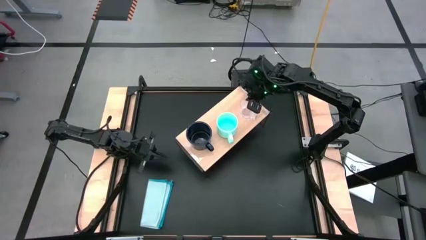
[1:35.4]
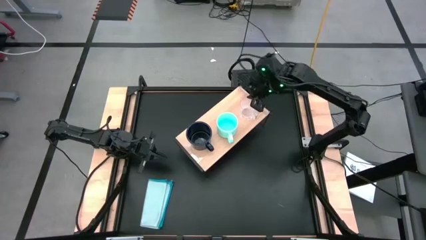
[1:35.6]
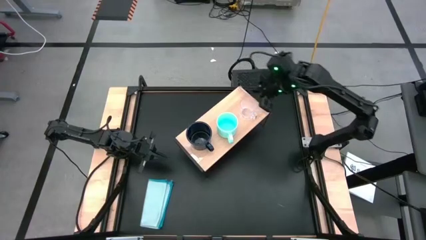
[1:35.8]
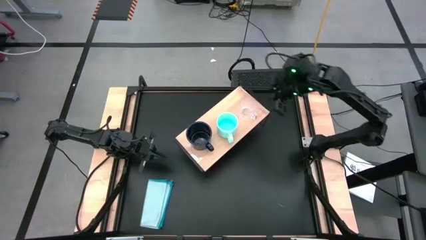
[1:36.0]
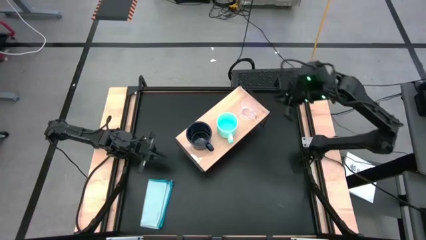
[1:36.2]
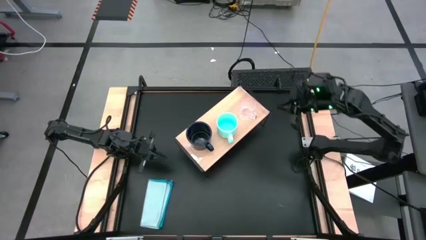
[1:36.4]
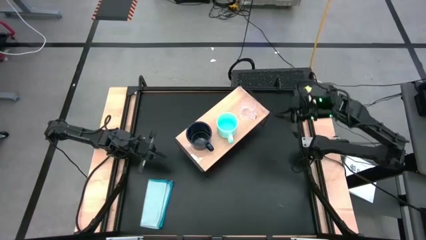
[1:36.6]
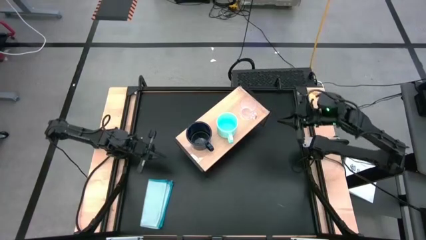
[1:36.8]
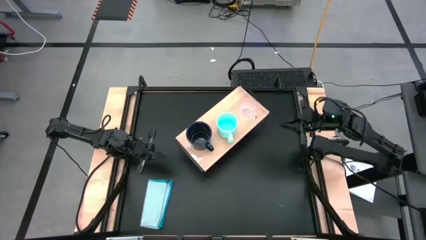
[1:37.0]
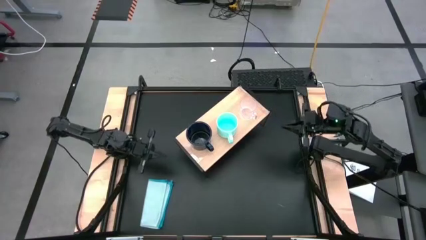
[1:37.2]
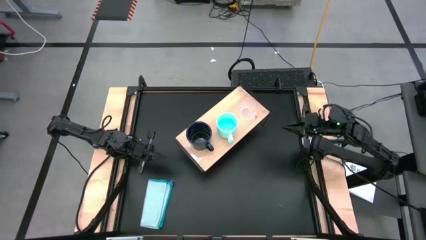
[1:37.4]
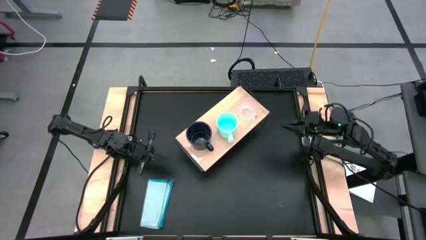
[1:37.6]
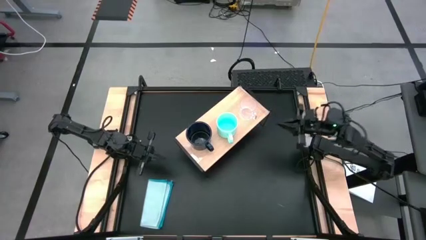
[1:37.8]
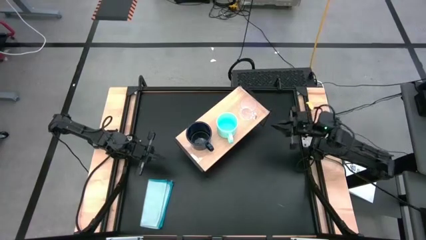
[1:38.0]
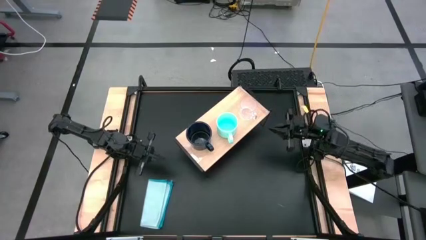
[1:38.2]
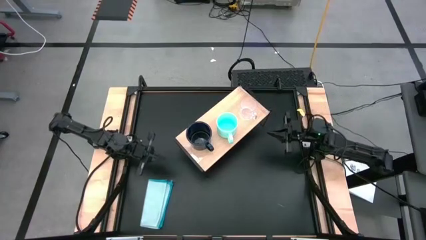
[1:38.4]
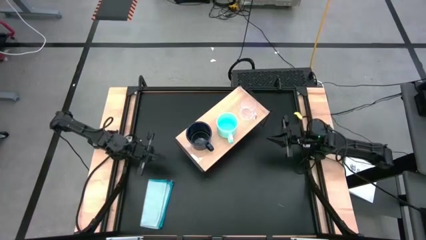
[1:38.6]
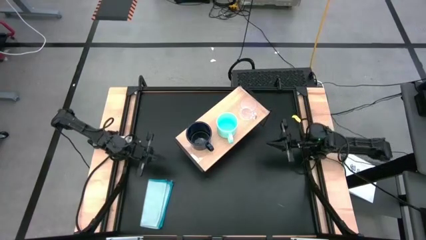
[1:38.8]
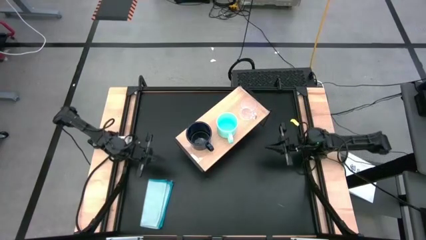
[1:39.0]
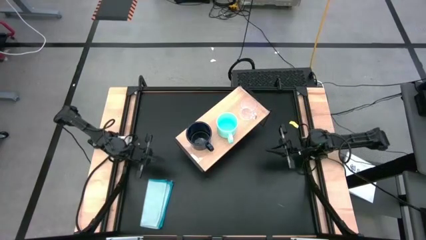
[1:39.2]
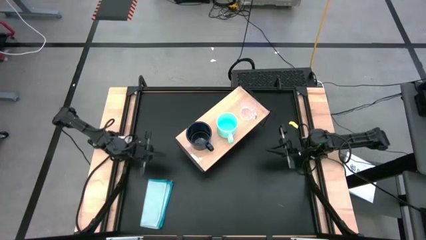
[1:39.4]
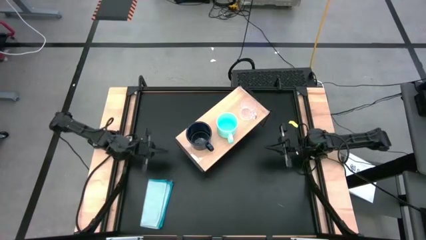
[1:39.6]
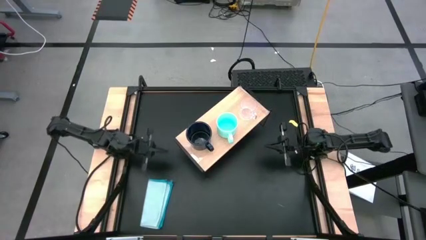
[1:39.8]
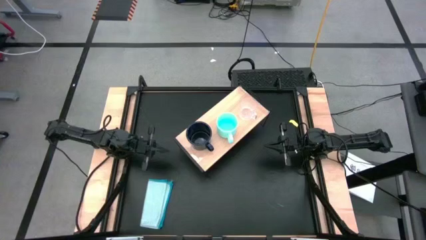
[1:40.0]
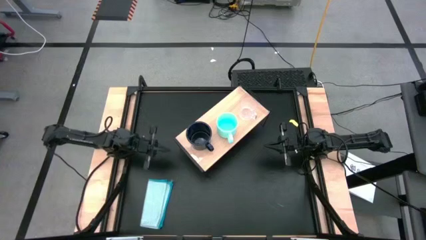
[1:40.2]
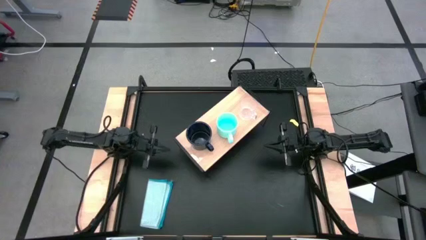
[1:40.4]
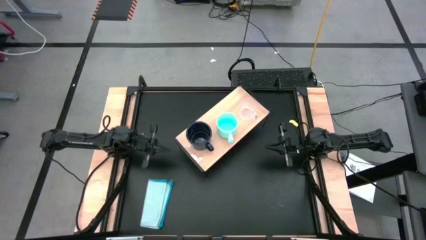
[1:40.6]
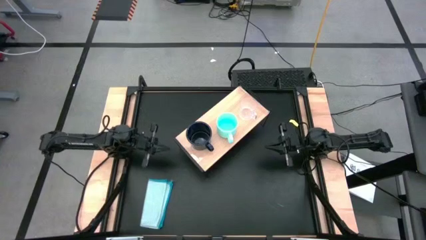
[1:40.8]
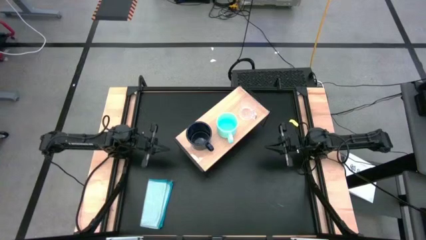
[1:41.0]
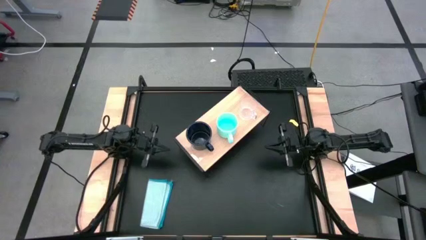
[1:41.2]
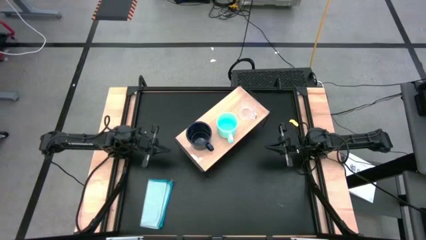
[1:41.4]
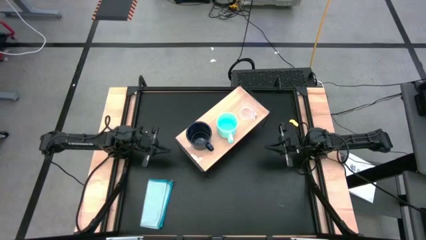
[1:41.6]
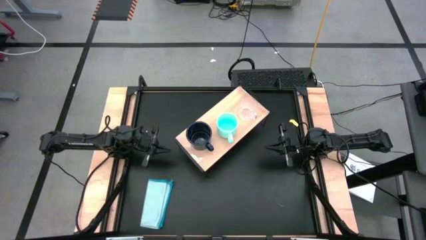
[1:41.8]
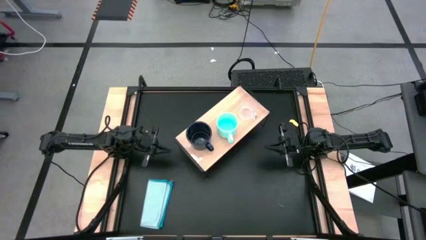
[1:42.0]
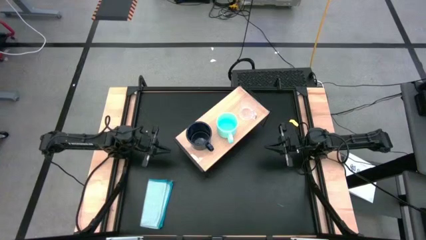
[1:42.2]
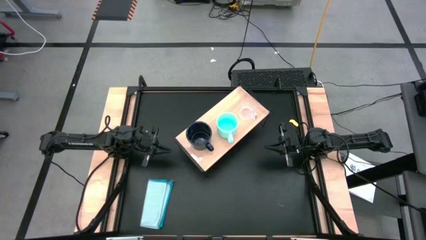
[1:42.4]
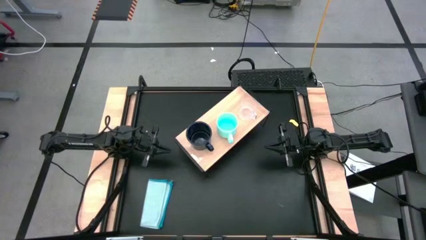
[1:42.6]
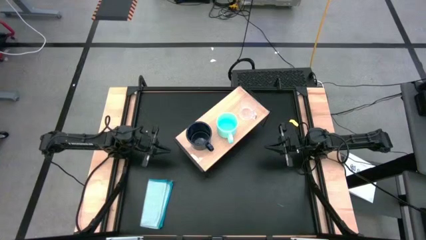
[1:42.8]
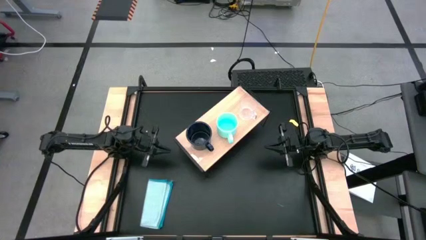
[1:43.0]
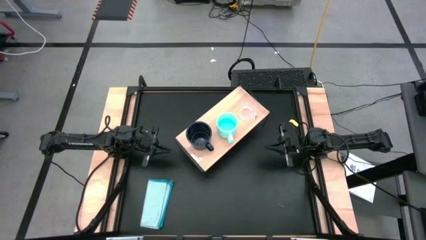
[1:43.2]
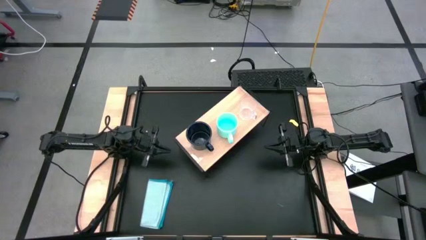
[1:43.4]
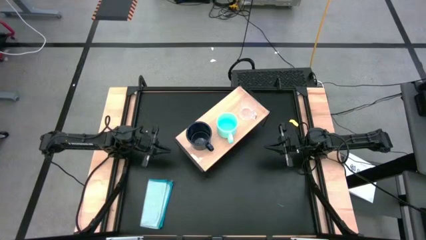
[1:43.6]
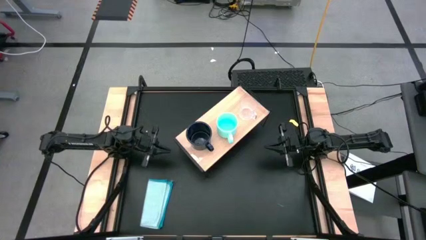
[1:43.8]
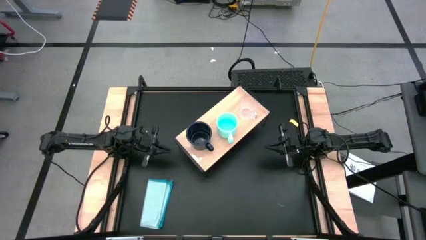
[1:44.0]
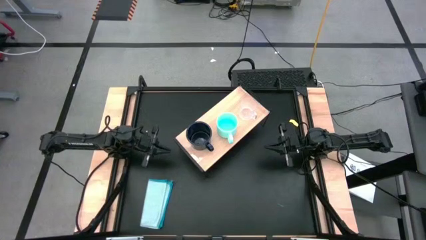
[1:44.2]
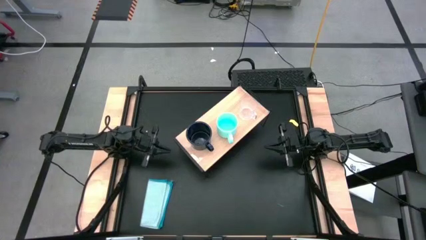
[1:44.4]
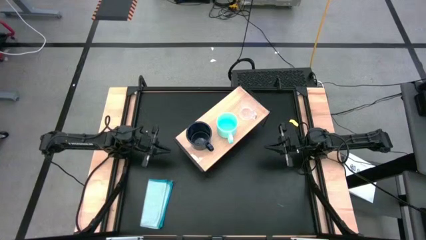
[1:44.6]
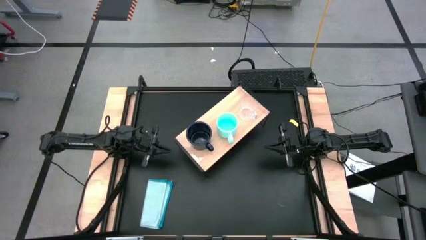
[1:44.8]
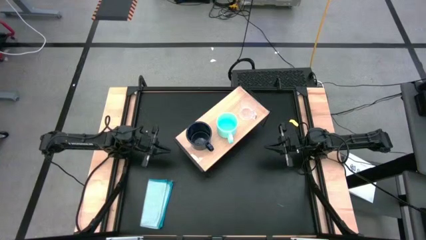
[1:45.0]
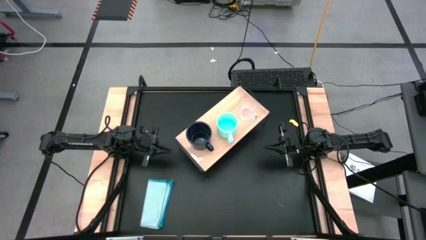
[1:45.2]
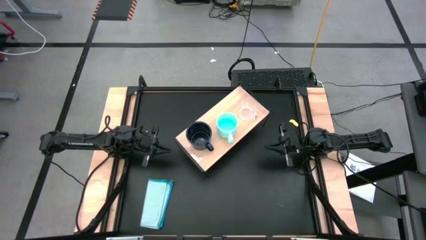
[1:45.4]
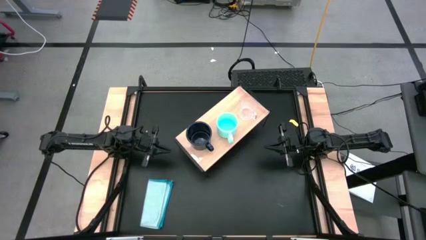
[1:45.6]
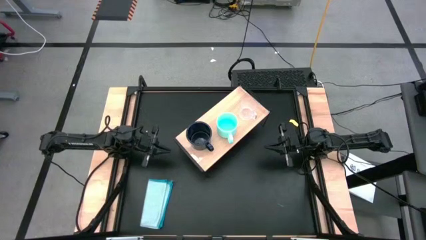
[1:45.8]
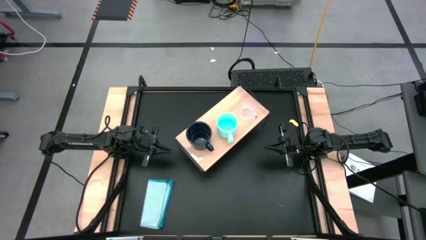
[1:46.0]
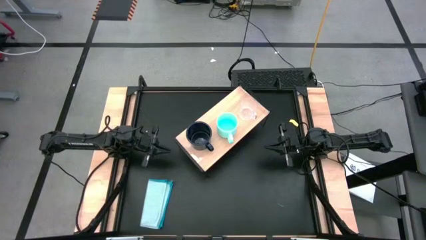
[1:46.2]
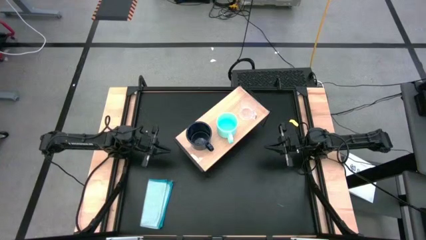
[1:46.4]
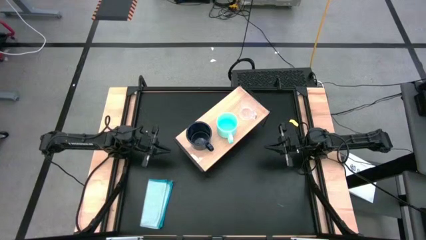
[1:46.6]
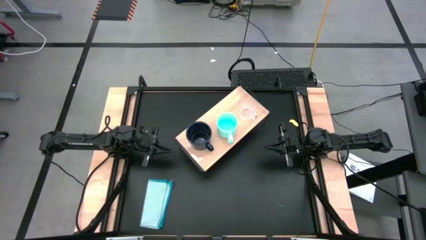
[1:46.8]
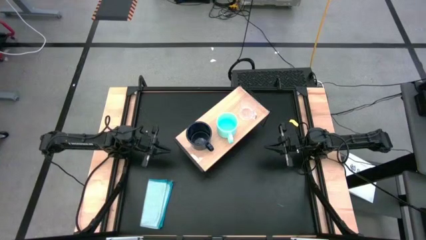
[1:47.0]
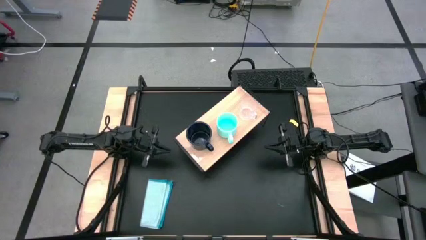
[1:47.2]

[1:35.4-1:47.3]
Task: Stack small to large cups/mugs on shelf
Return to Home Position

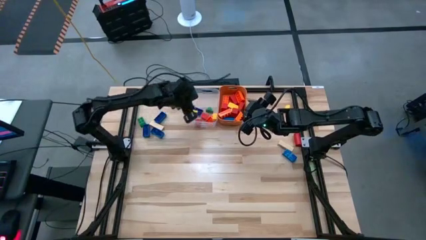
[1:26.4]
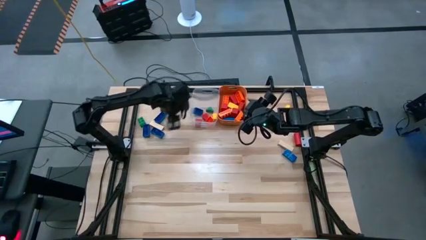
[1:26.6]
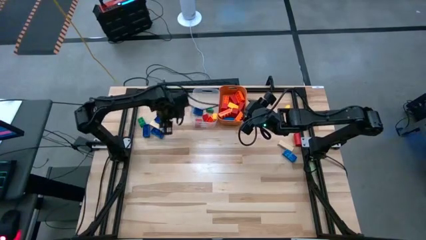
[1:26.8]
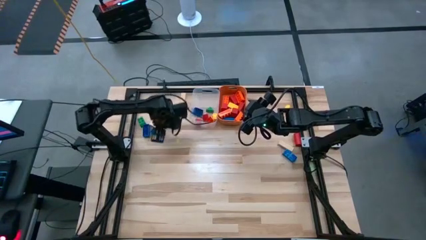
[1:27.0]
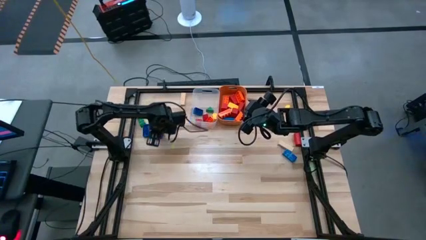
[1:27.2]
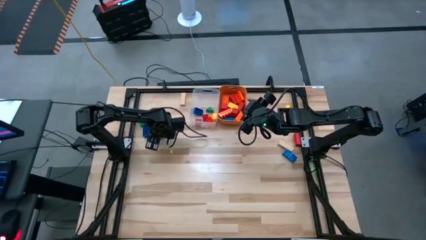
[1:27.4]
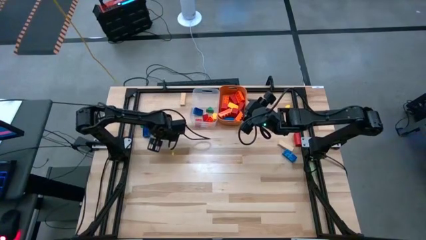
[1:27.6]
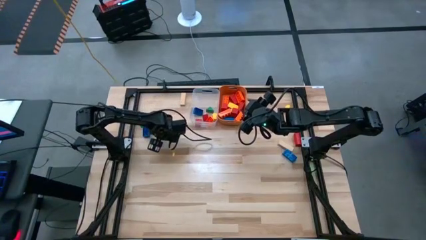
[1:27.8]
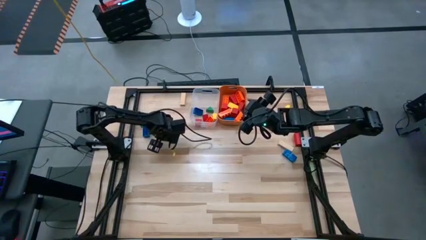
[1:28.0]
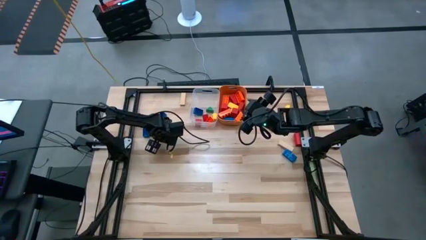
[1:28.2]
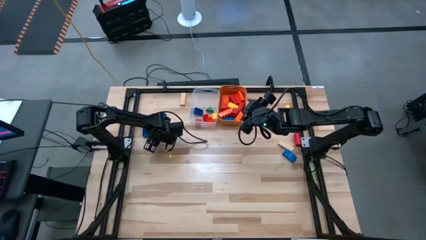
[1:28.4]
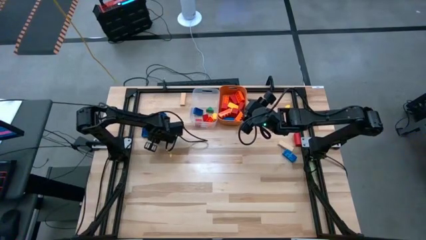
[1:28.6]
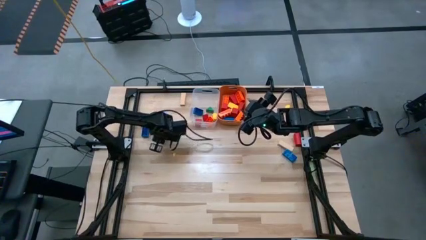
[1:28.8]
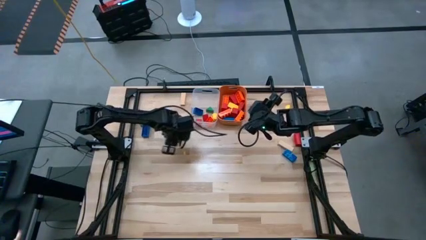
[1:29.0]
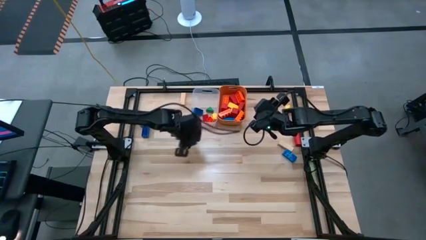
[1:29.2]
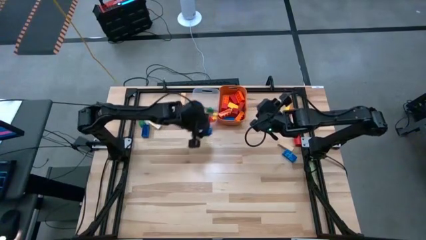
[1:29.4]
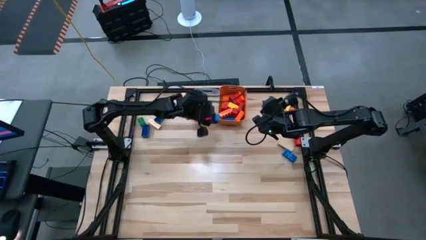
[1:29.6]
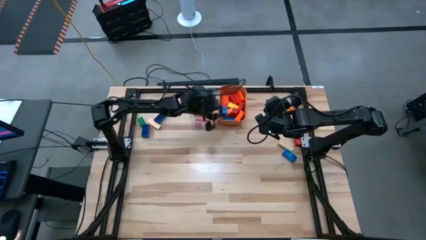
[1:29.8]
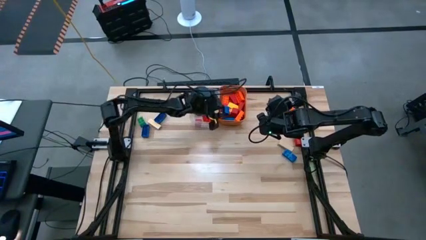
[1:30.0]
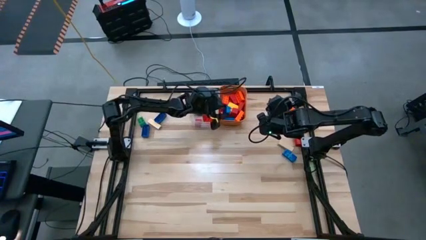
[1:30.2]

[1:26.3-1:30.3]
Task: Sort blocks by size
Put the blue rectangle game piece into the orange bin

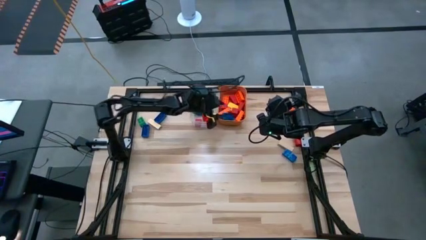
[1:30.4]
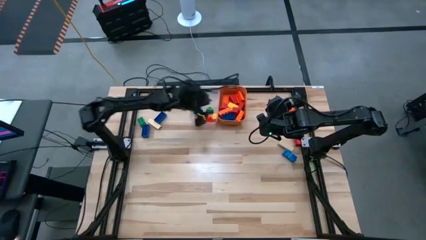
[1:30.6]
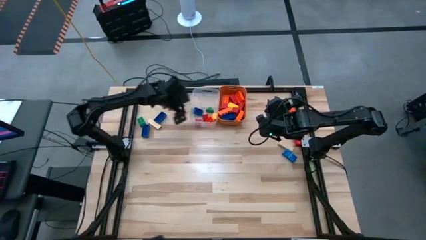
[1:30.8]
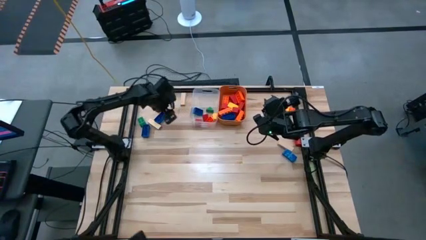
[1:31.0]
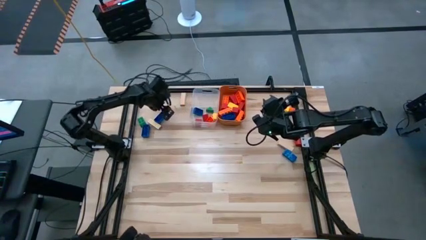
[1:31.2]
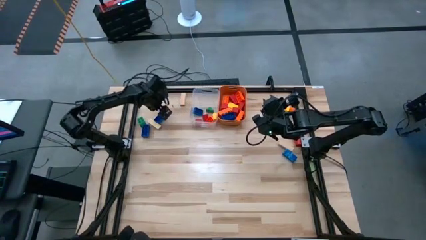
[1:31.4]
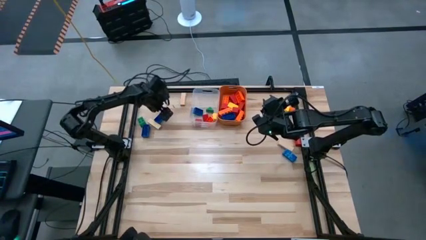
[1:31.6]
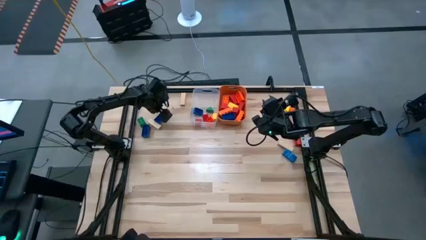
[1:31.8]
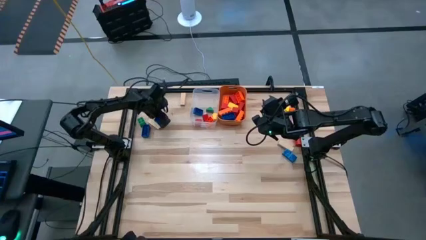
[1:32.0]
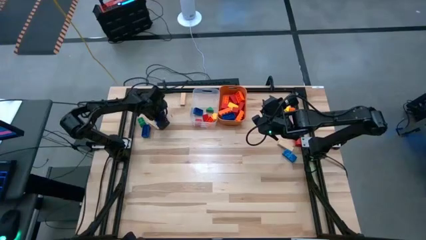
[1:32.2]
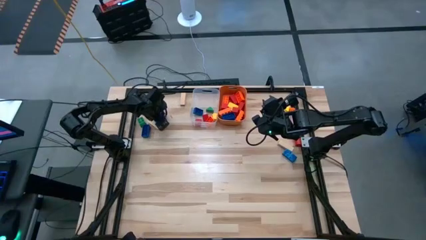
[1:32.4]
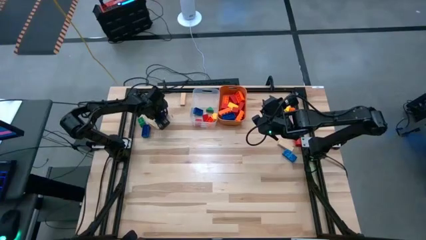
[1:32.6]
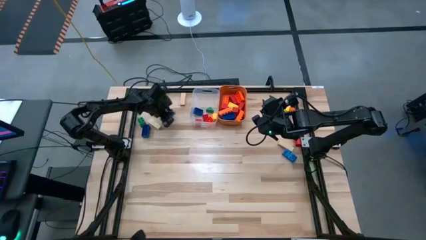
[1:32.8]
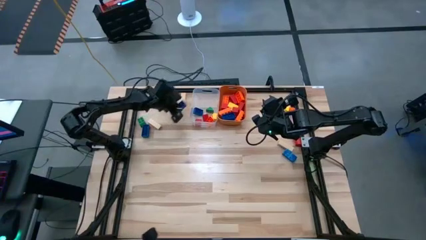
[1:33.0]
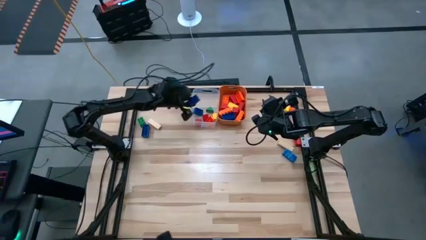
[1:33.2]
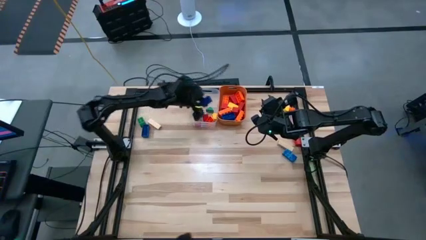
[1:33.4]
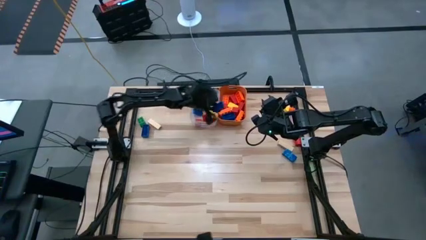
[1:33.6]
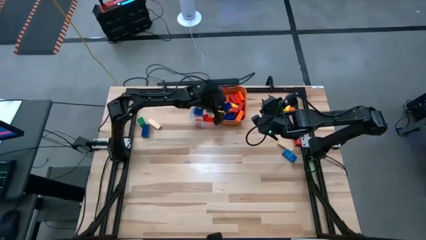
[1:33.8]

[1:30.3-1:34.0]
Put the blue rectangle game piece into the orange bin
